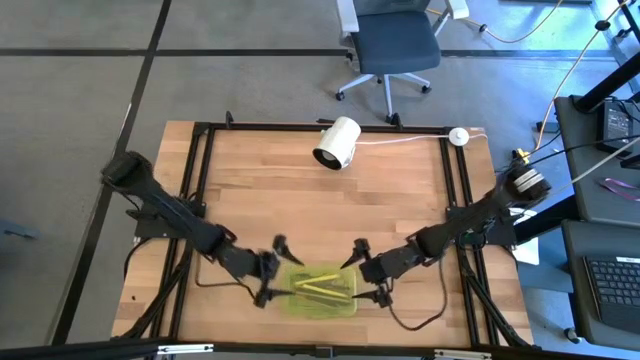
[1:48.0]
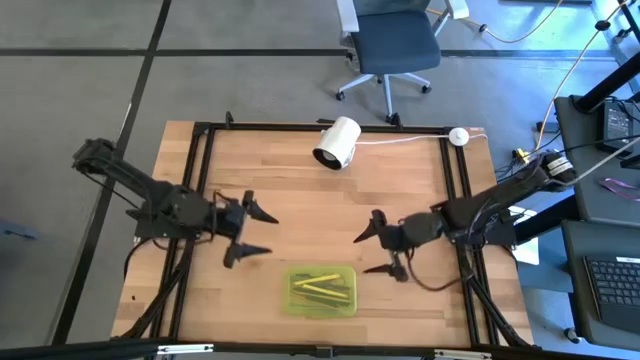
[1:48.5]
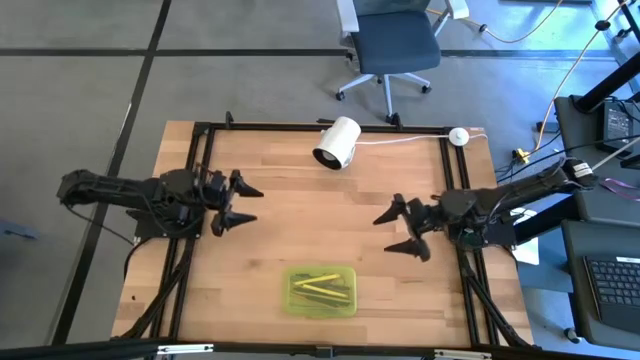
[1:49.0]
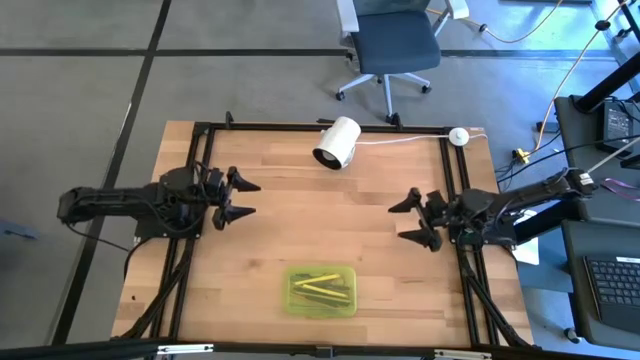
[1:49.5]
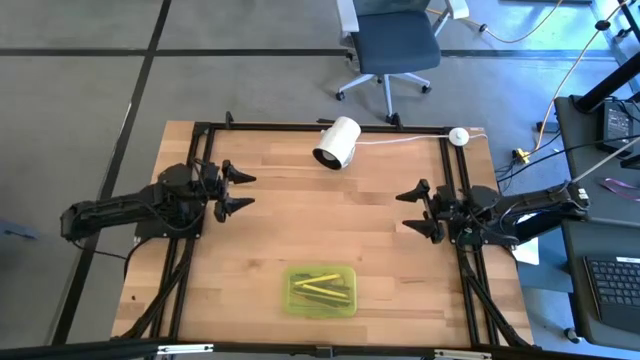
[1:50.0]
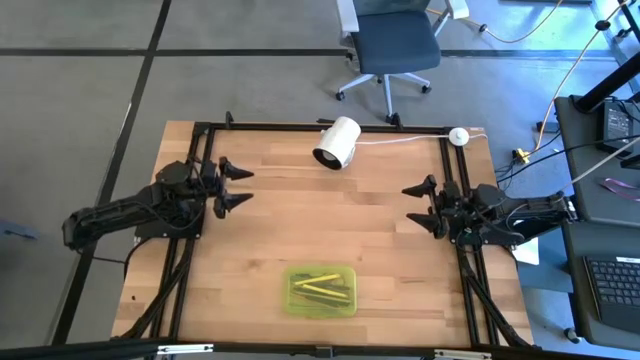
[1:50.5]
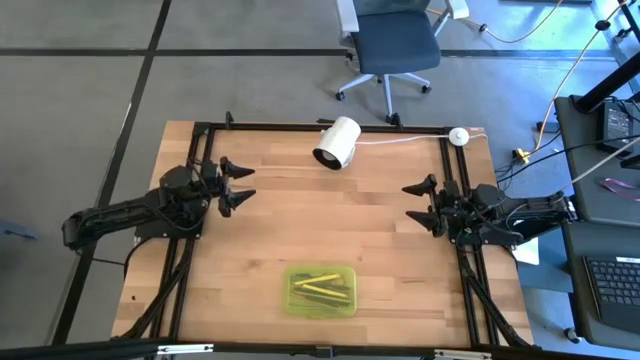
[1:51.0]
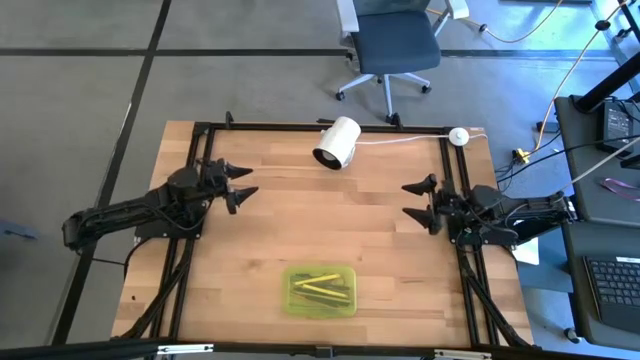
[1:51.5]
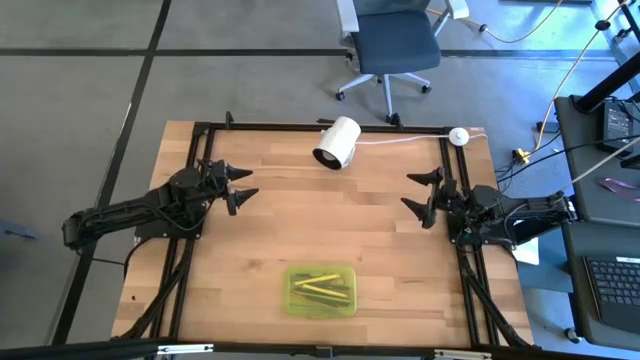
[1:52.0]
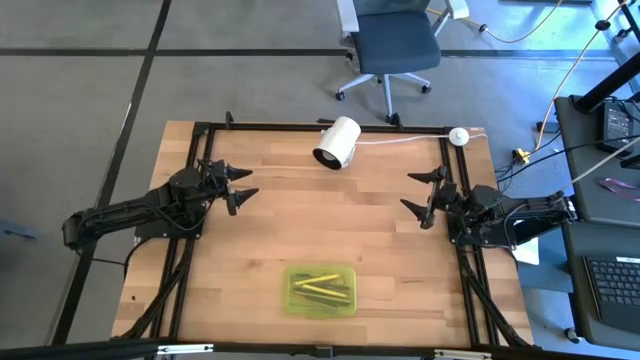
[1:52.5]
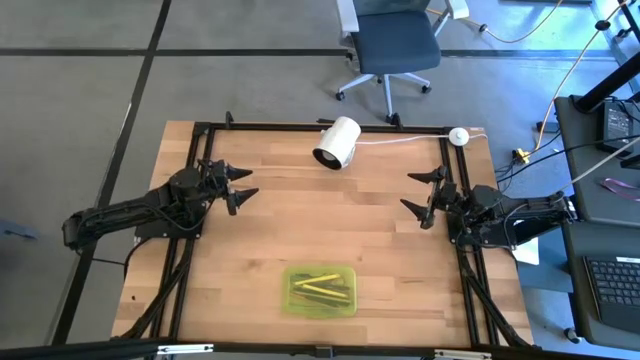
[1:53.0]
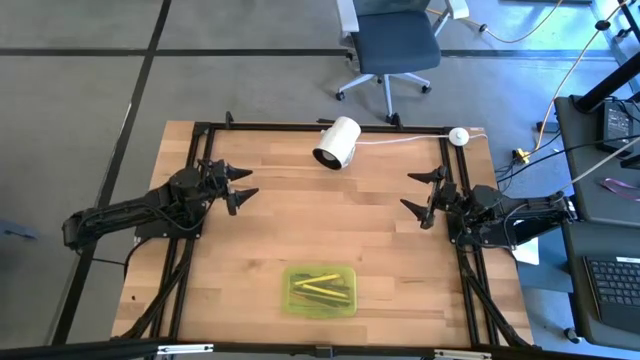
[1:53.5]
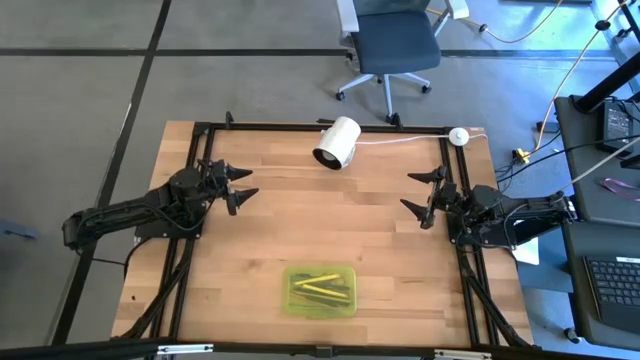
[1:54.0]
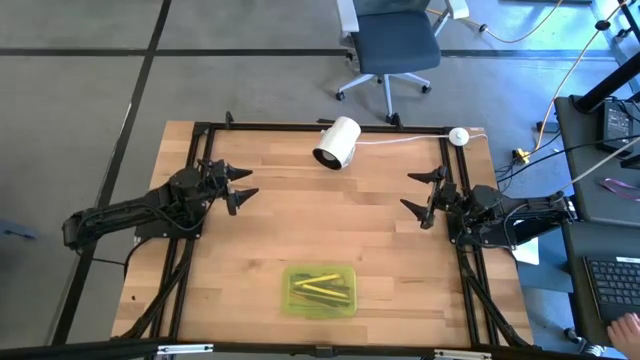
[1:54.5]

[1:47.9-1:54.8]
Task: Pick & place school supplies into a supply box
Return to Home Position

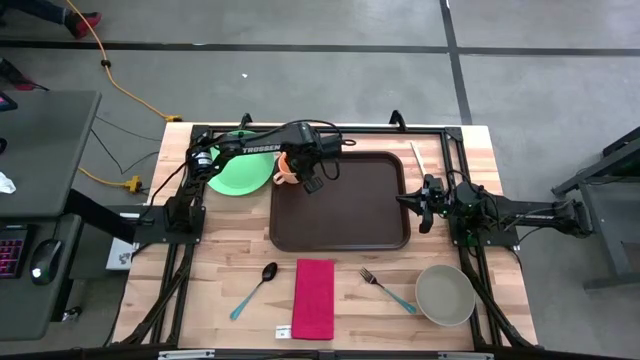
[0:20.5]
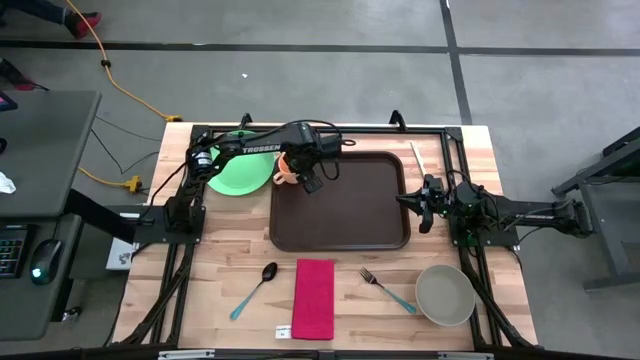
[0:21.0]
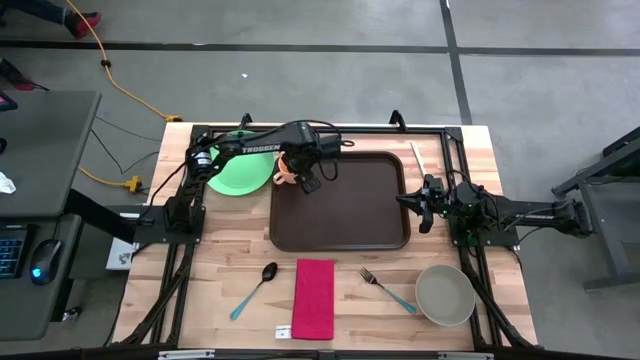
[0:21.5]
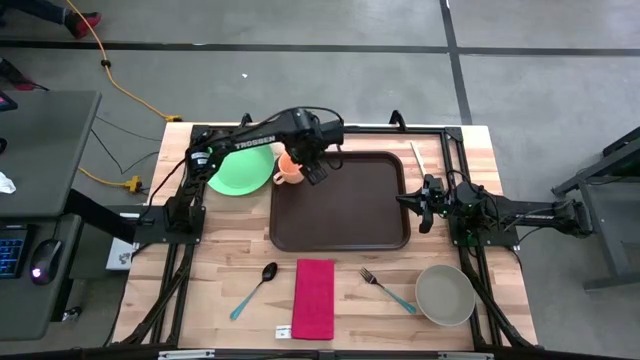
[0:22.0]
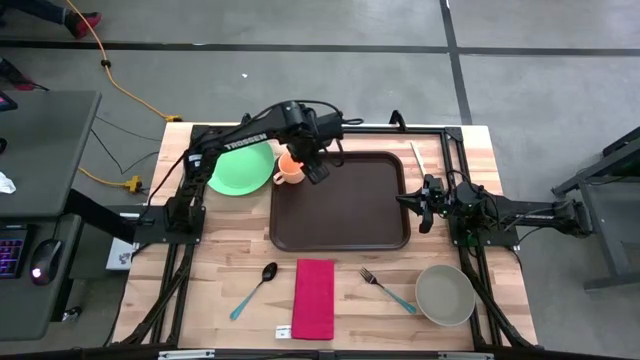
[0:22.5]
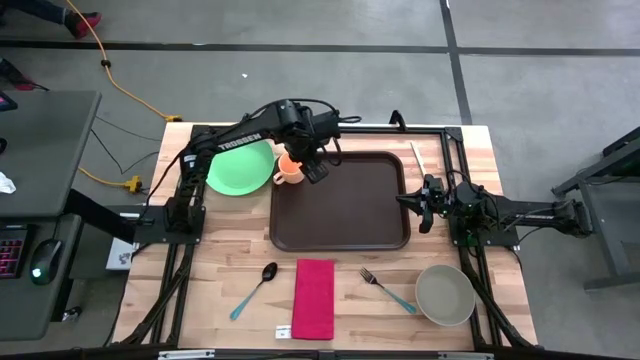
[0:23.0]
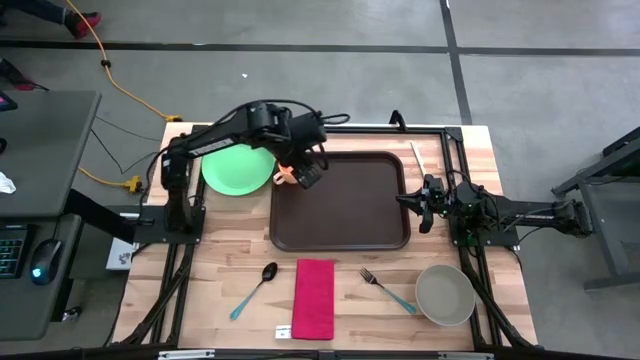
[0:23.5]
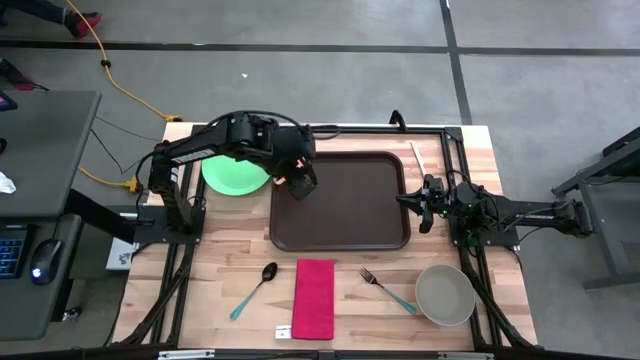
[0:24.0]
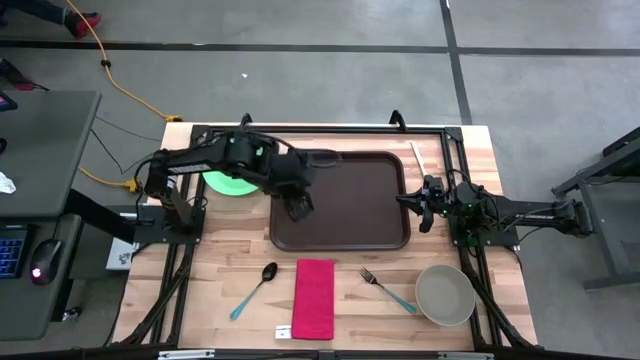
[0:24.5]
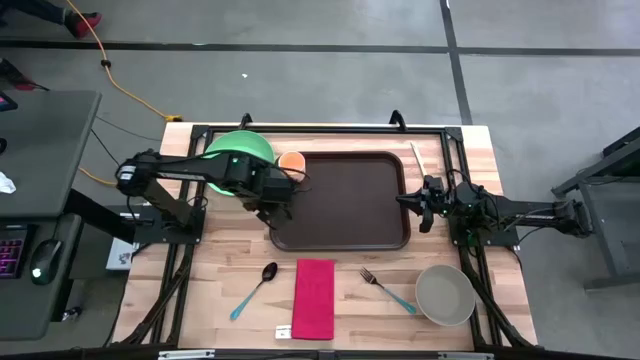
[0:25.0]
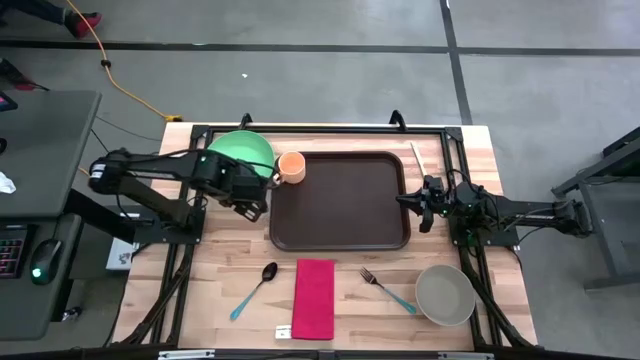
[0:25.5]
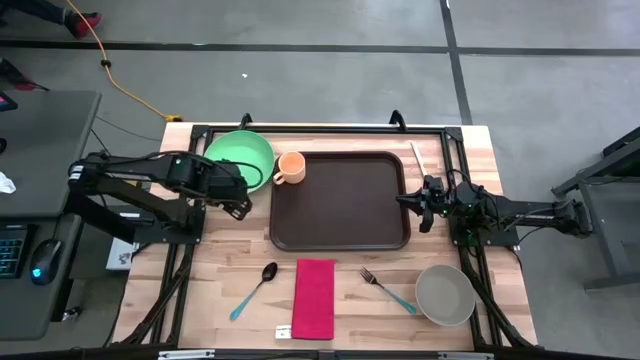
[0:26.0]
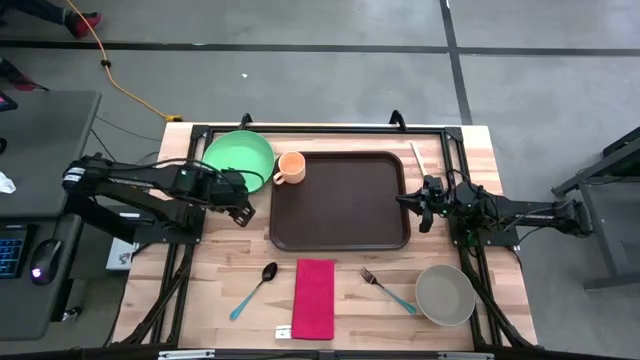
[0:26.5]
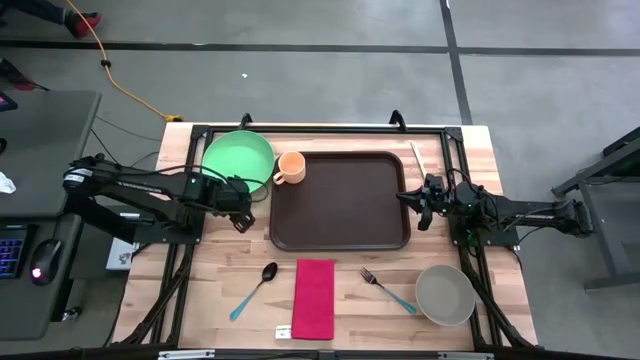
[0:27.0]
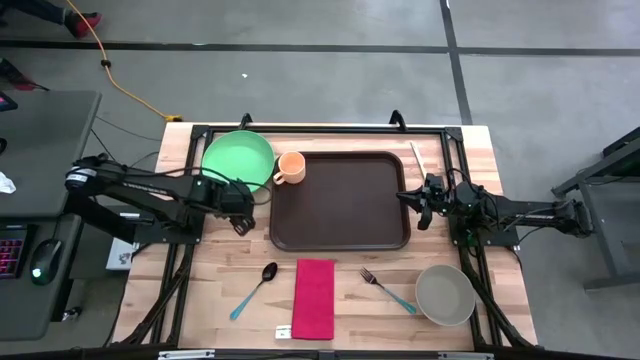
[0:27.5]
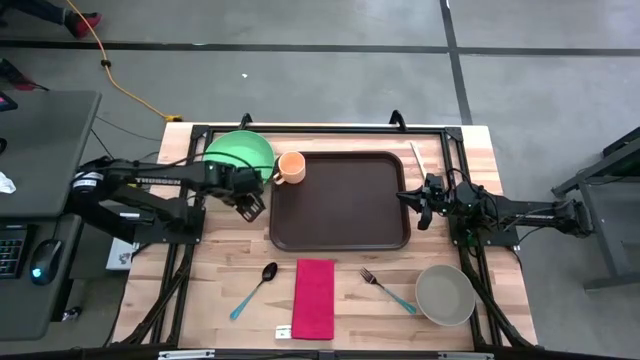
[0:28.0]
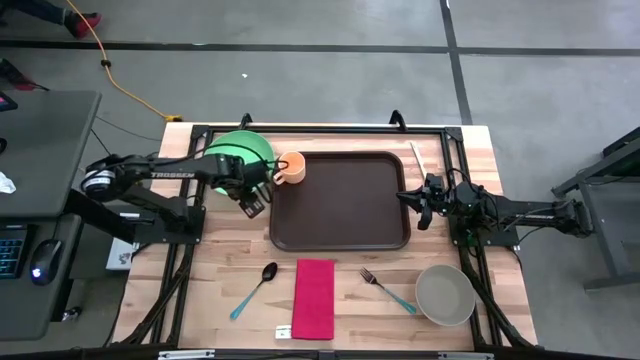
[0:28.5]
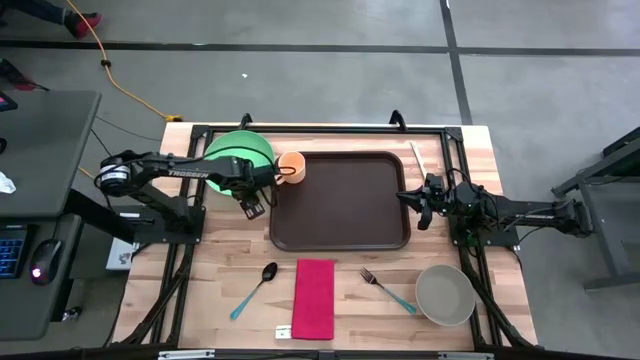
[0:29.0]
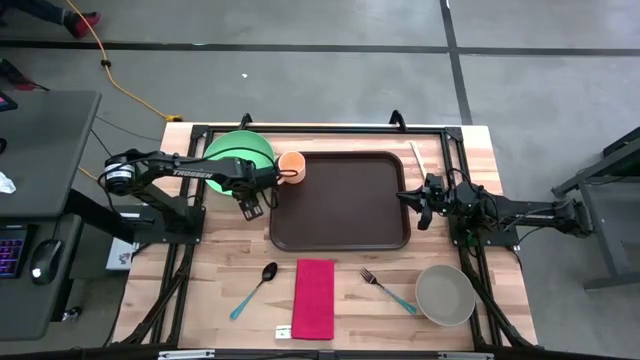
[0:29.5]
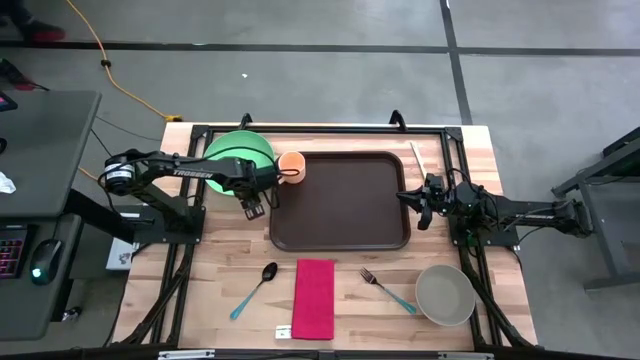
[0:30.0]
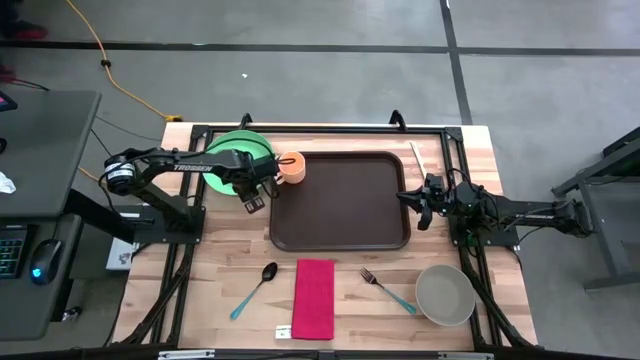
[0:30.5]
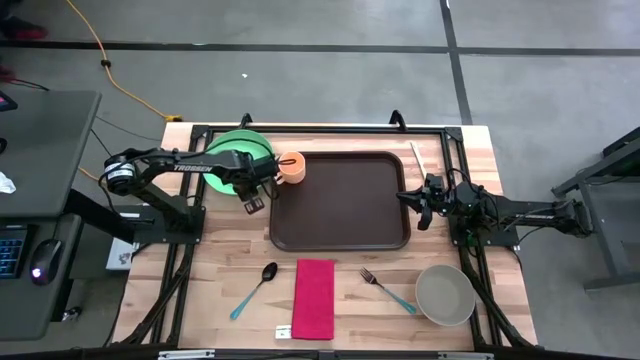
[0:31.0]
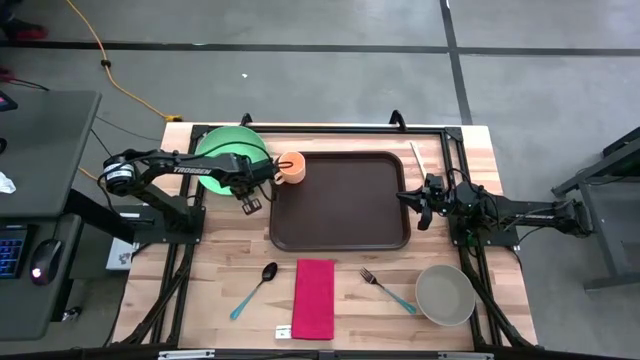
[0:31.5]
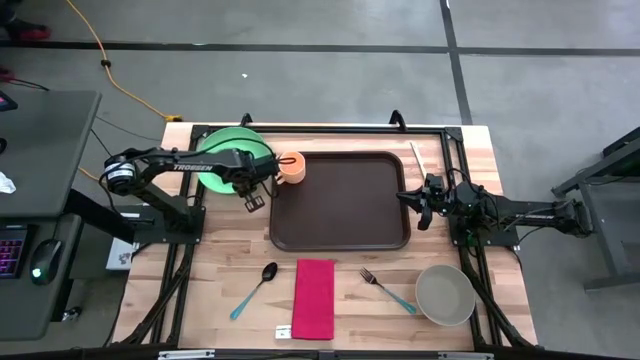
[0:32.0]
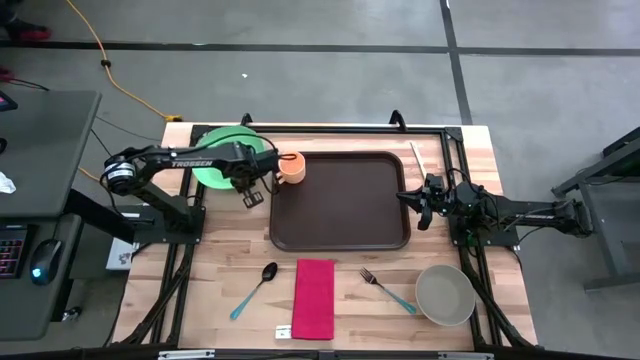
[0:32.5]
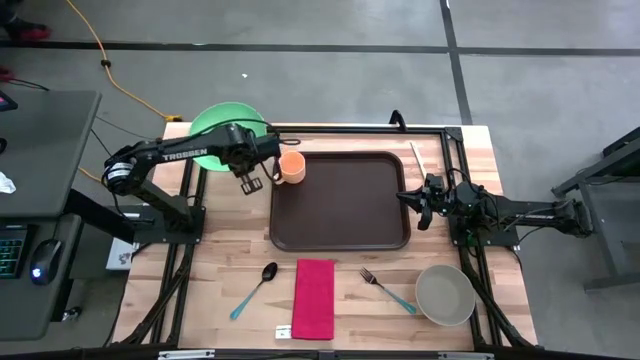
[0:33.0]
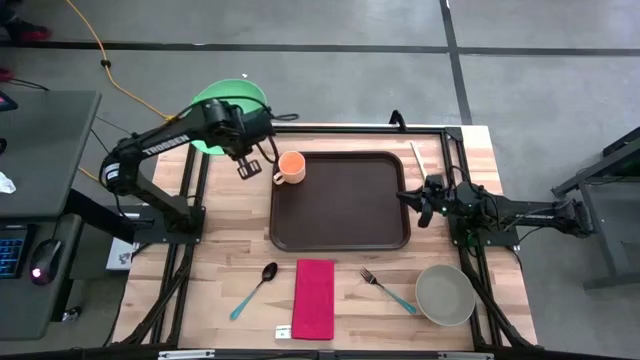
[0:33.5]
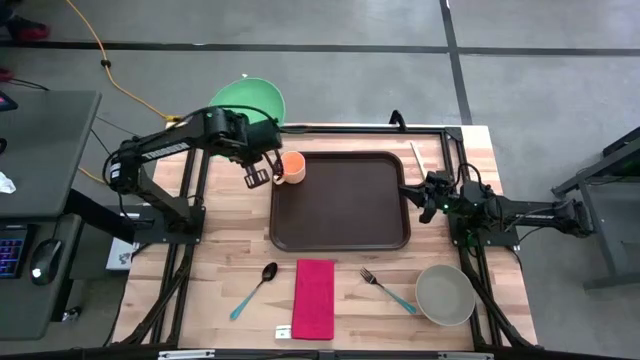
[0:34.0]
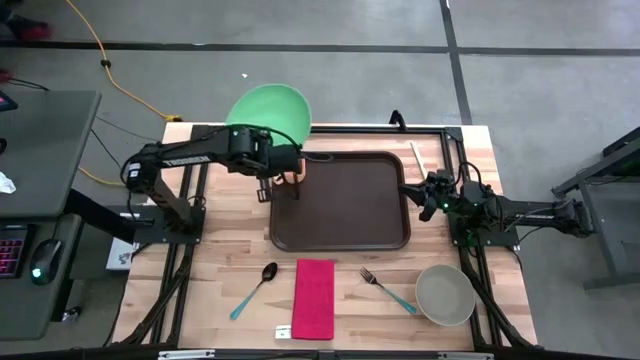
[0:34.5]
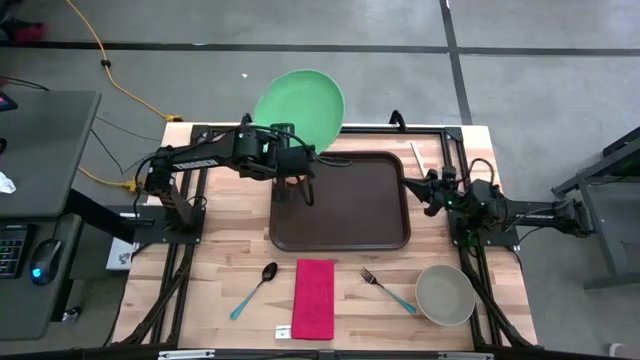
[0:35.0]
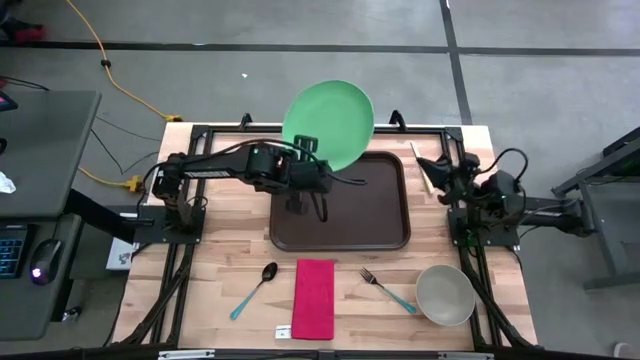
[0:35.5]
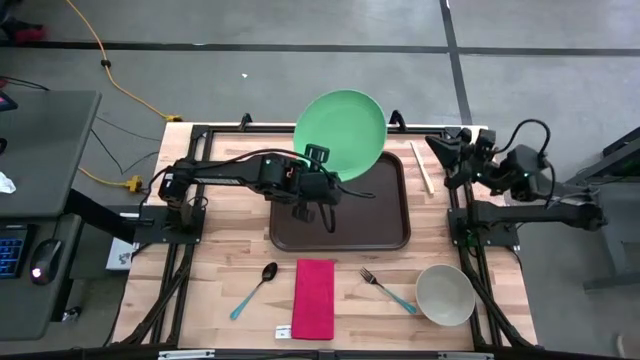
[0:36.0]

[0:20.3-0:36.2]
Task: Set up tray
Put the green plate on the brown serving tray to the bottom right of the yellow cup
